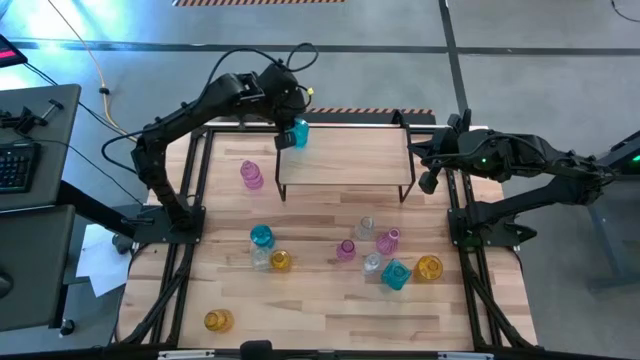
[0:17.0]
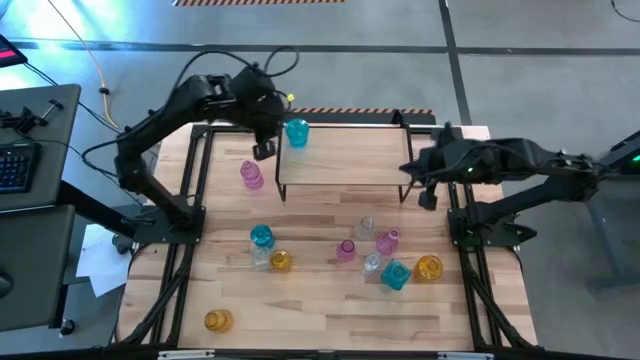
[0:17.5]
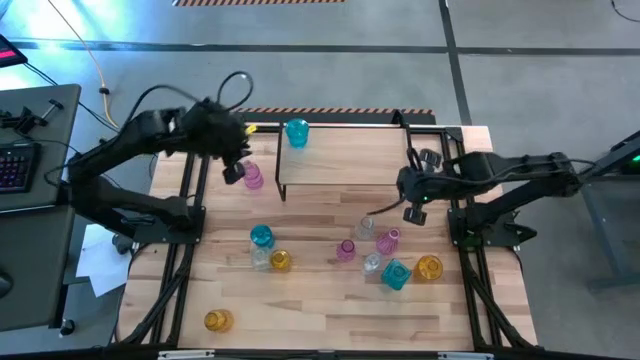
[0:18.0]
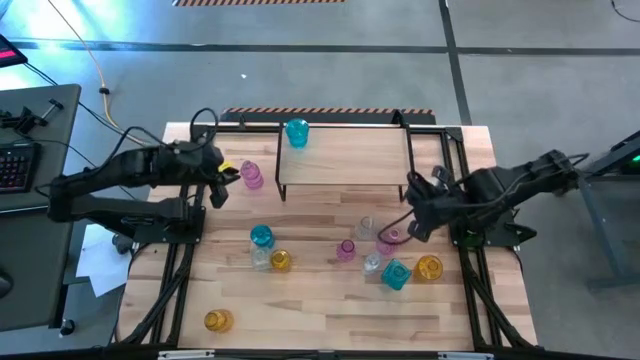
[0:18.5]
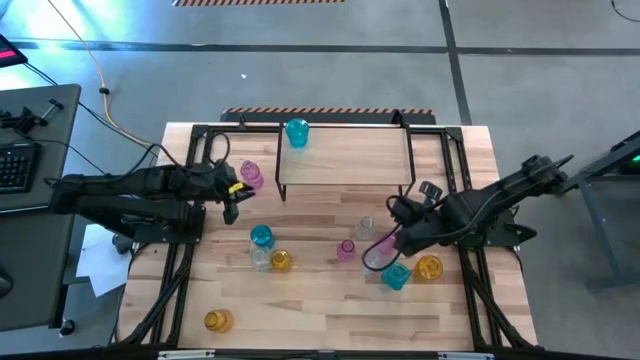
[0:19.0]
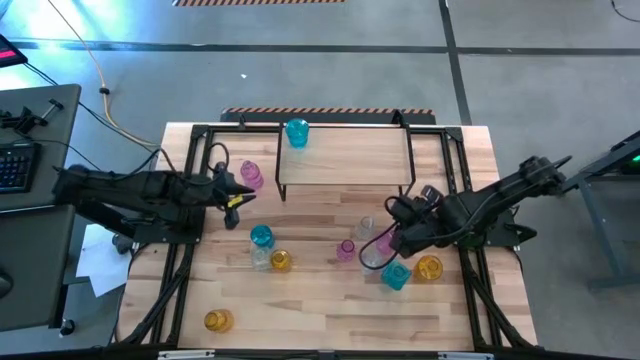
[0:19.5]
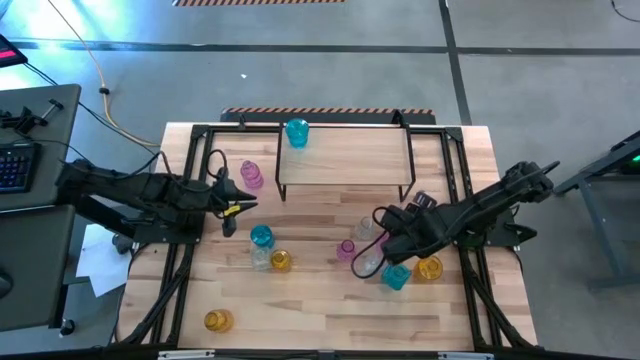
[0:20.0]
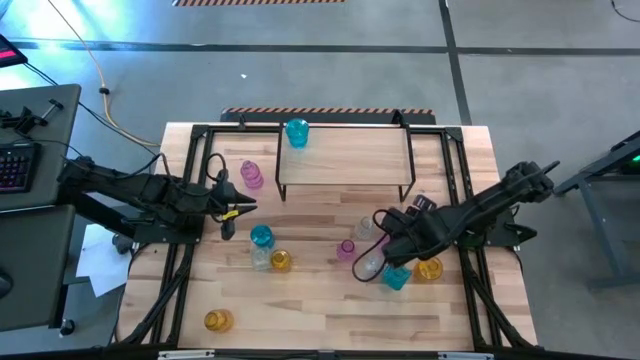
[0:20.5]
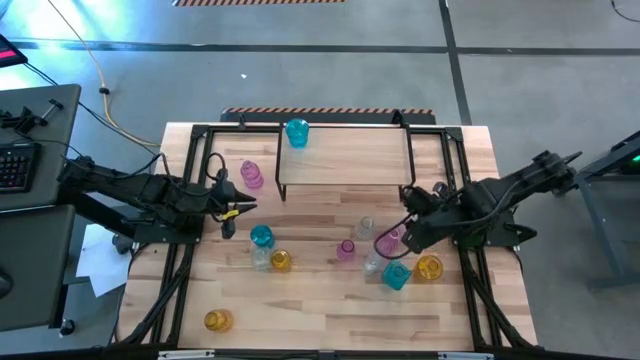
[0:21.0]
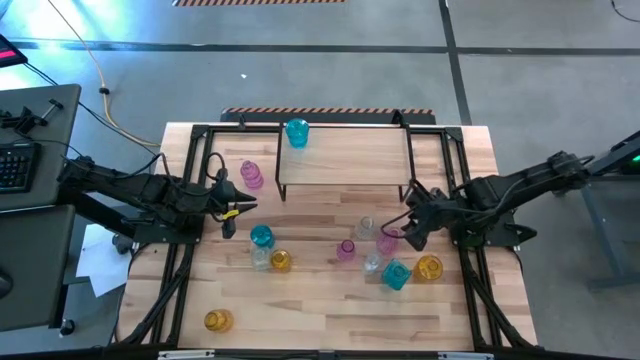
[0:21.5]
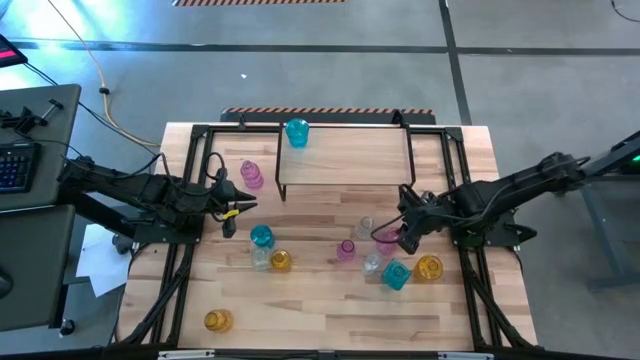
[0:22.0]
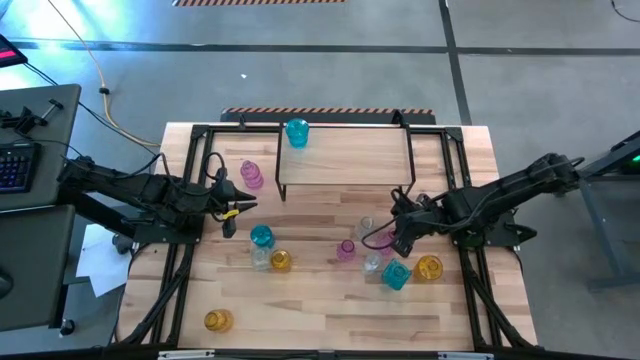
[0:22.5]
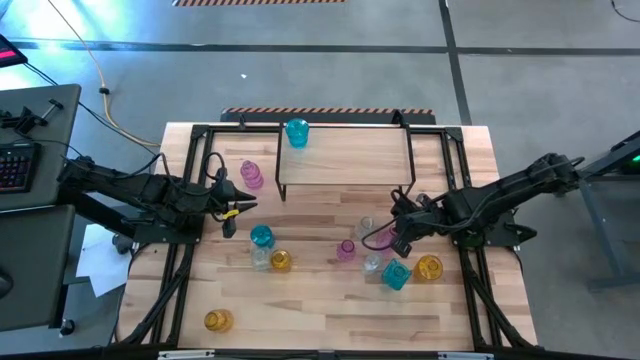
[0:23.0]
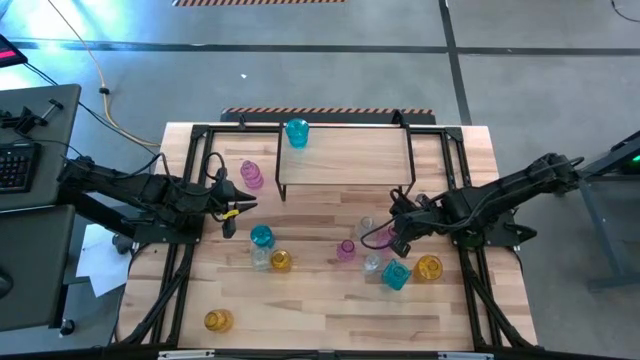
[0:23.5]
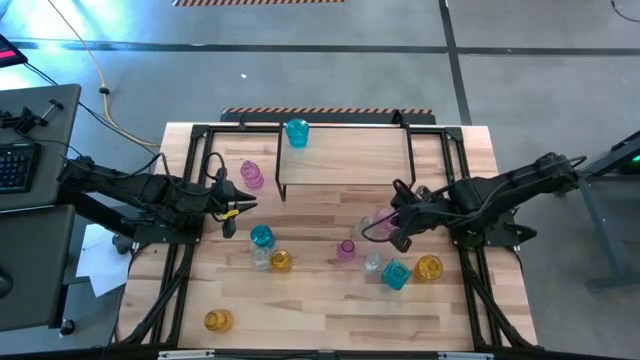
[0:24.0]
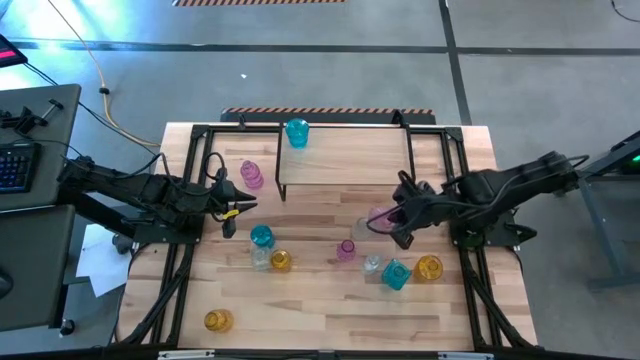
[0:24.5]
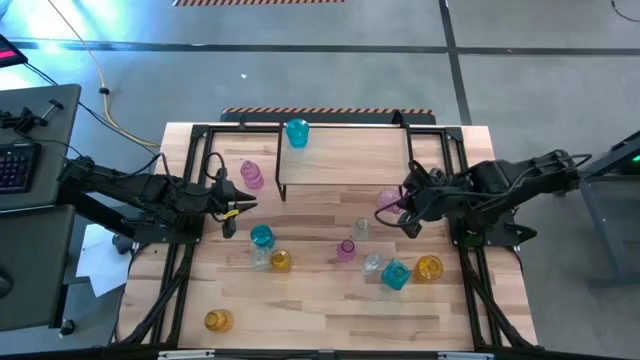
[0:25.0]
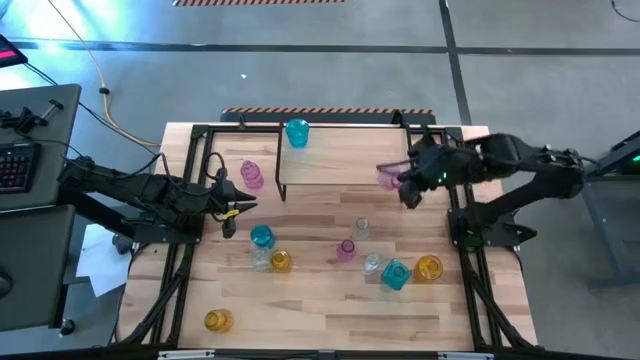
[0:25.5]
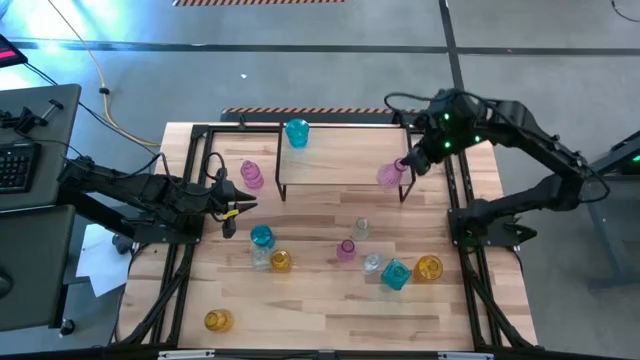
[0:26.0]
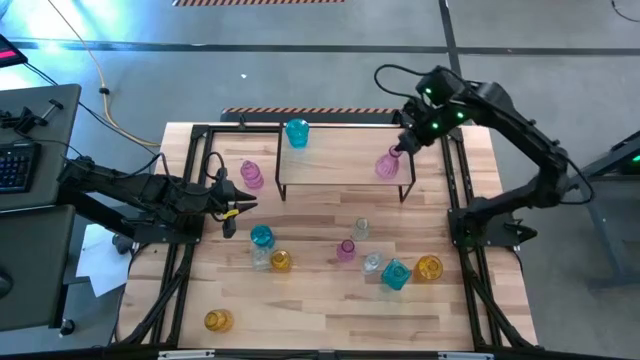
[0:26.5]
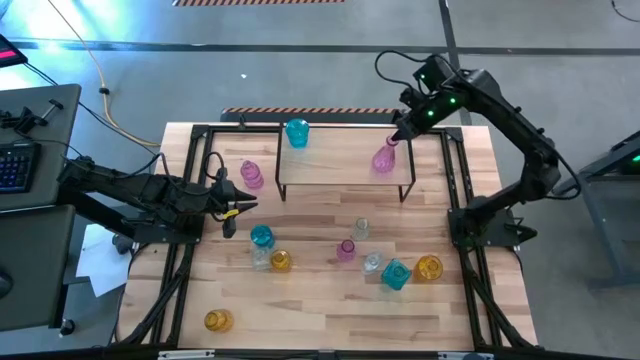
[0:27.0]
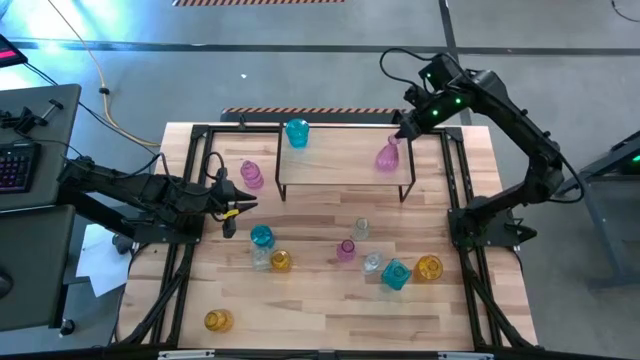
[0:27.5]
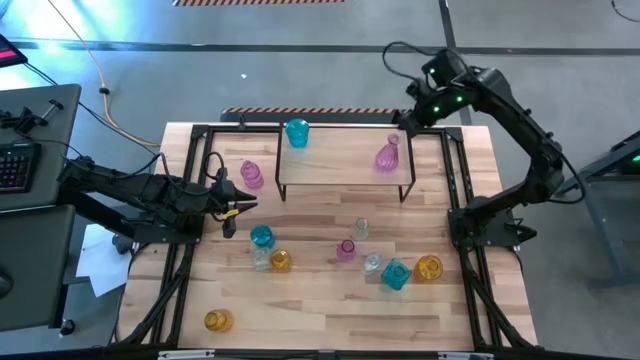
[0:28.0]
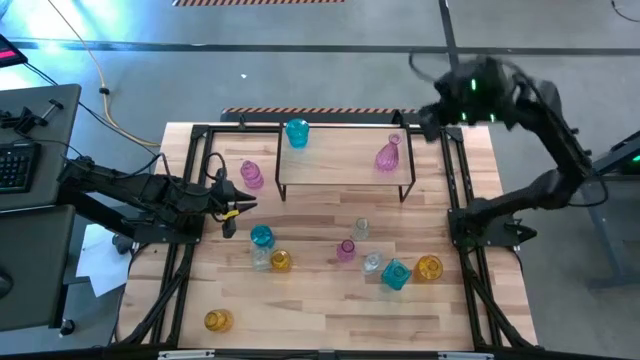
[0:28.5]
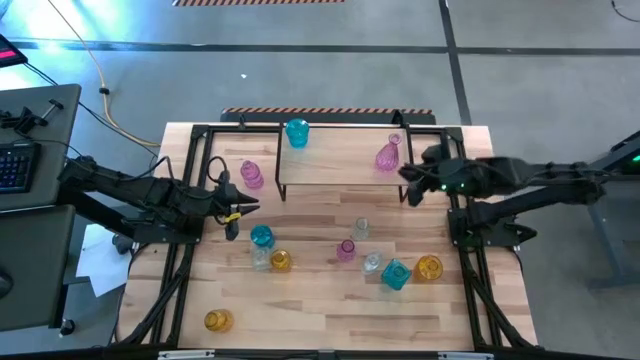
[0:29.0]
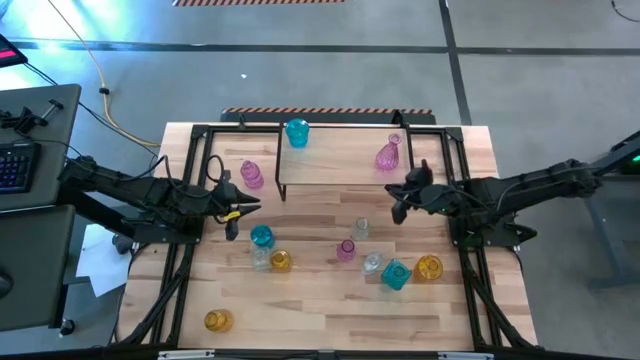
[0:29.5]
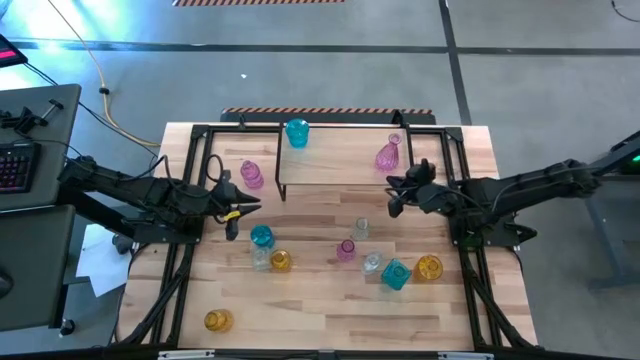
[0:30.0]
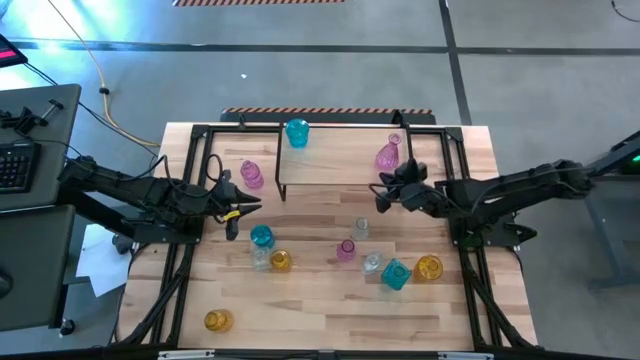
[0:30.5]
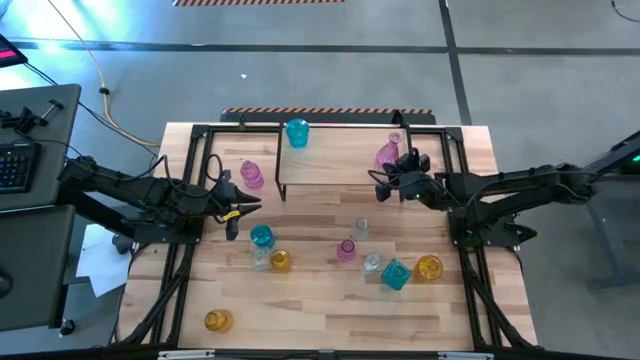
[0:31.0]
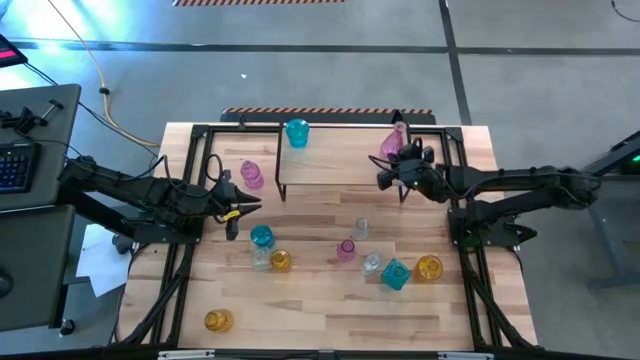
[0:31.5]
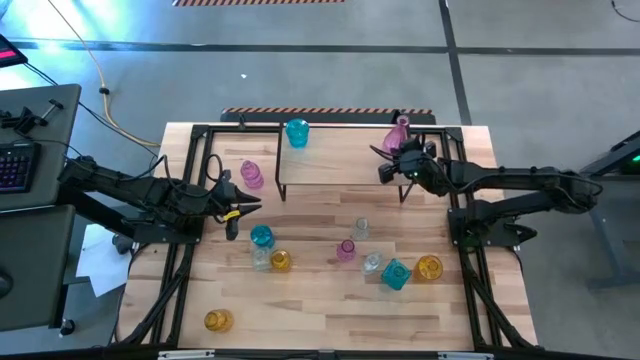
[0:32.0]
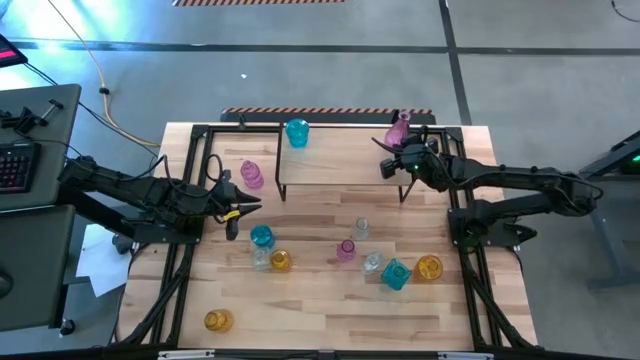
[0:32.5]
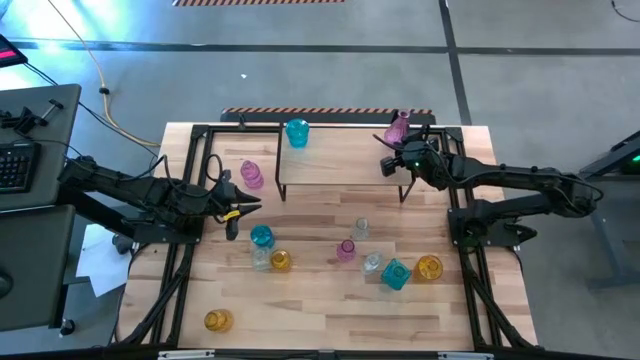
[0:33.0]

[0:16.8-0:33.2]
Task: sort vases onto shelf
Put the bottom right purple vase on the shelf

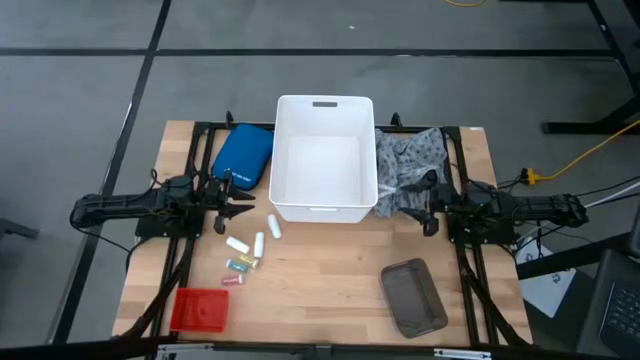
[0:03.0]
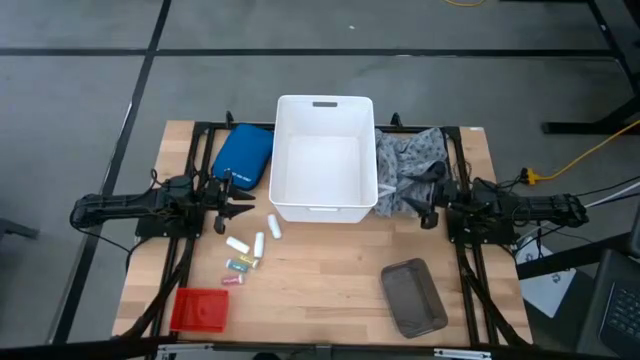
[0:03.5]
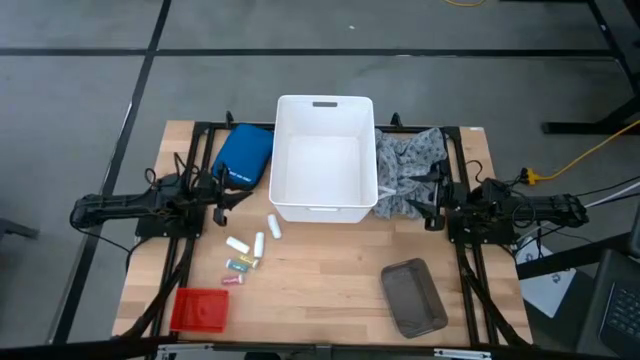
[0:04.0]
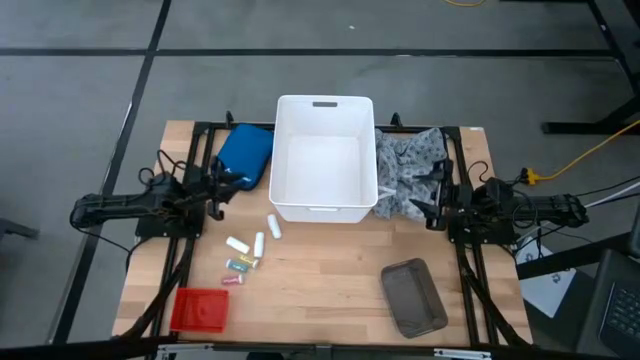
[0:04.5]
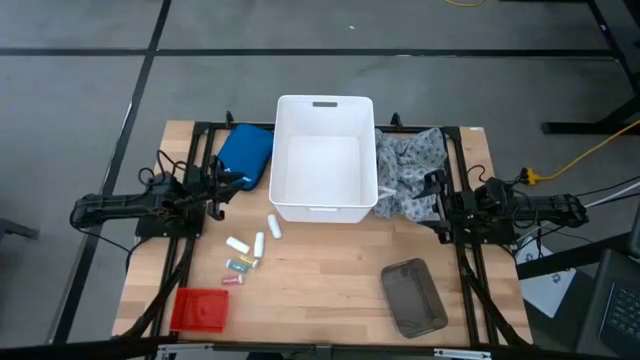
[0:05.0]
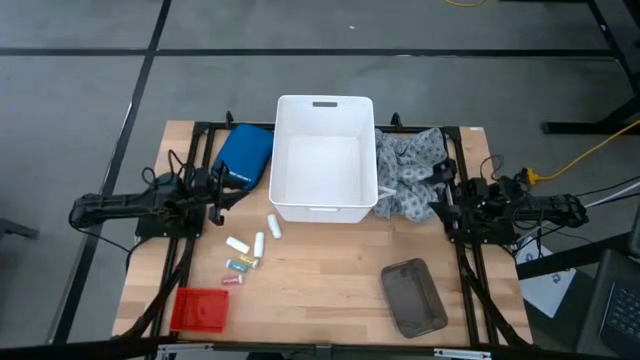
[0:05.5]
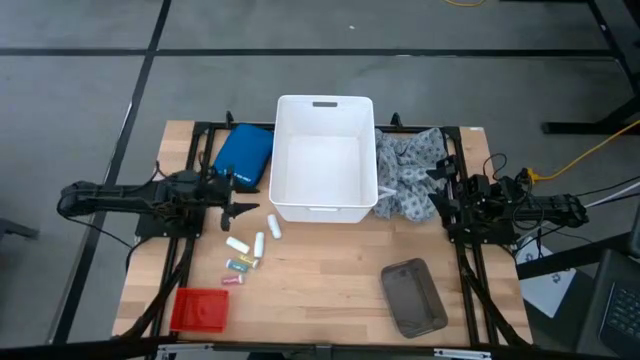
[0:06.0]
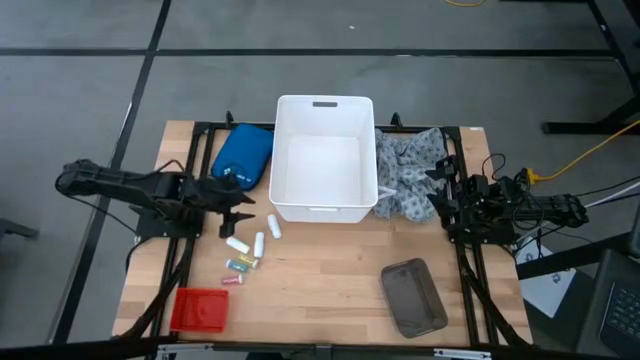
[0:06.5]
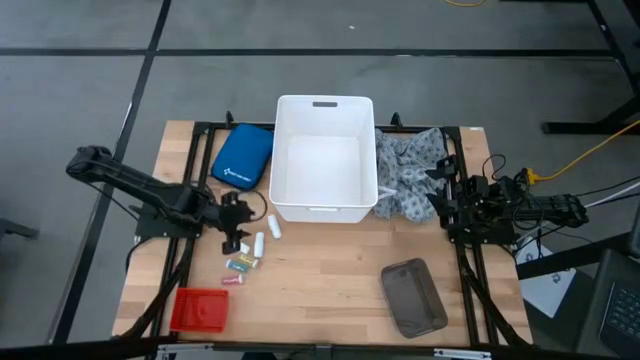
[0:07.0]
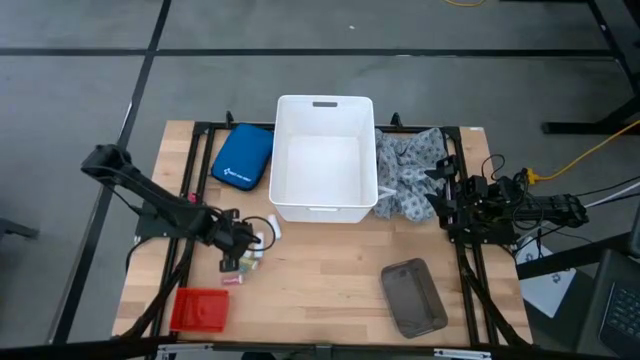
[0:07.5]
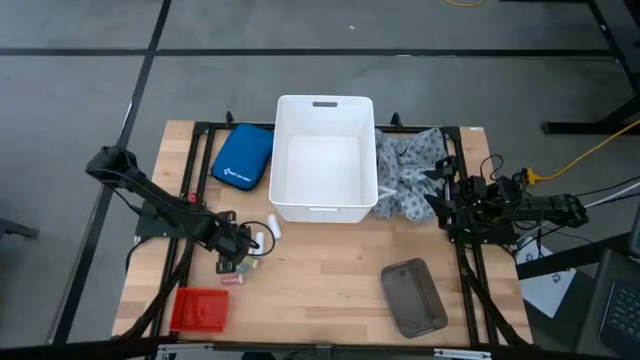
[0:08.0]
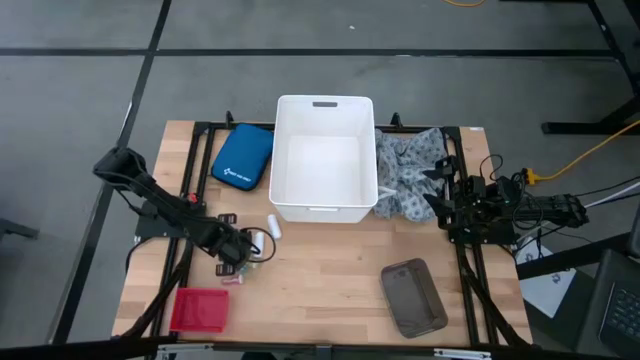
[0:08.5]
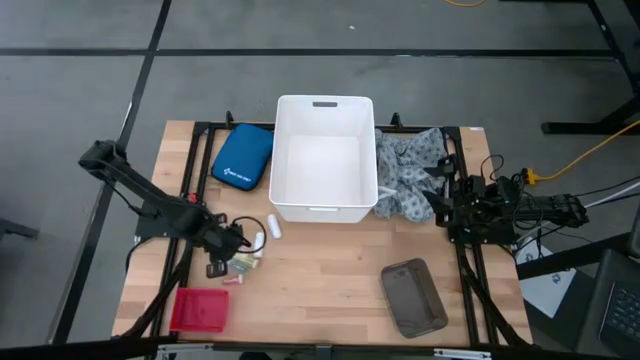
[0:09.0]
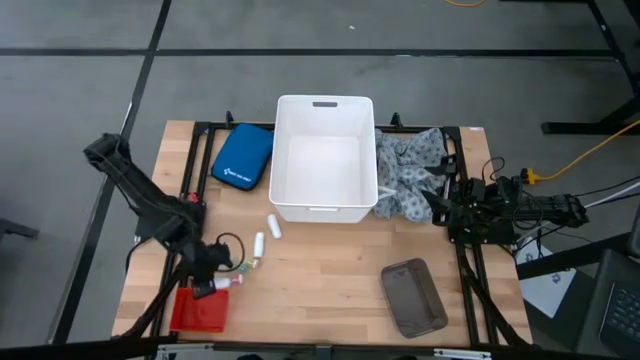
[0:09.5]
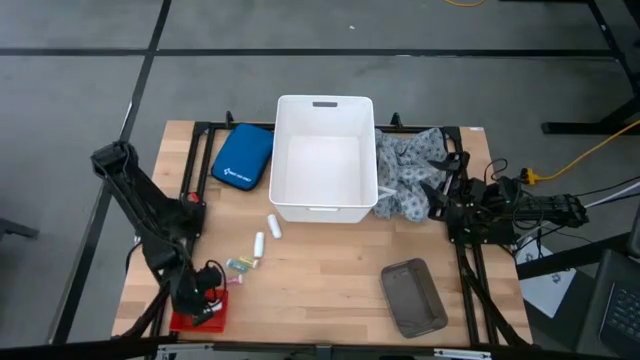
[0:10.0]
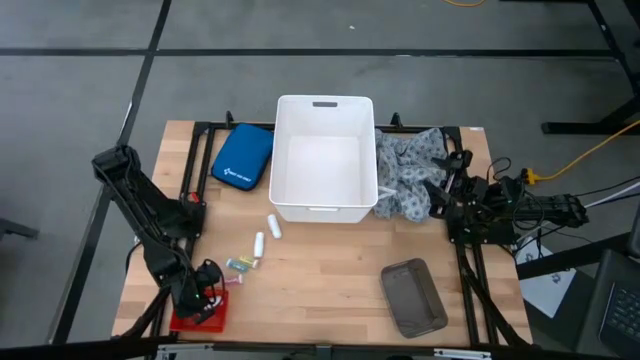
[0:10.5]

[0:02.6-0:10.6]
Task: Pick & place medical supplies in basket/bin
Put the left white rolled gauze into the red bin
